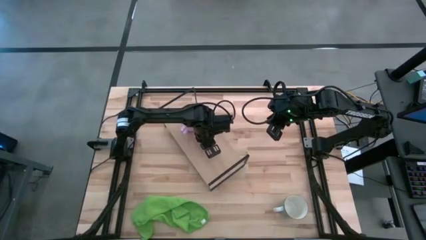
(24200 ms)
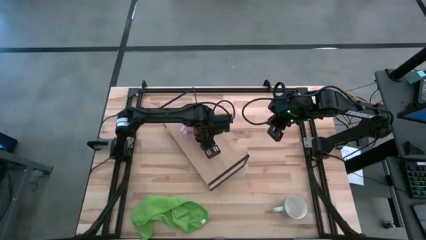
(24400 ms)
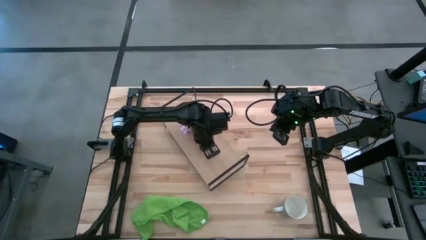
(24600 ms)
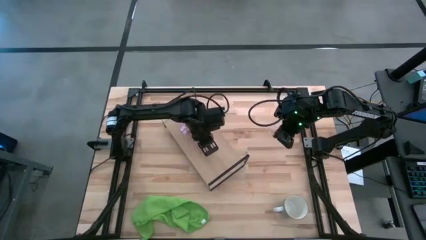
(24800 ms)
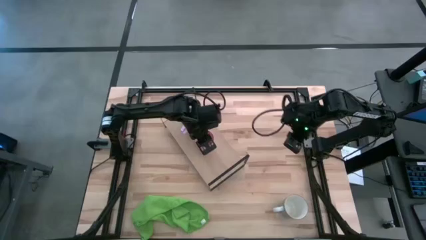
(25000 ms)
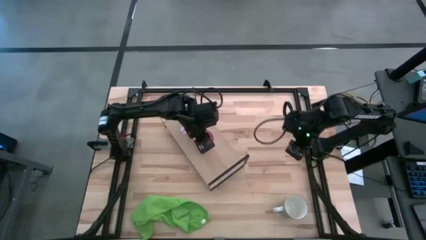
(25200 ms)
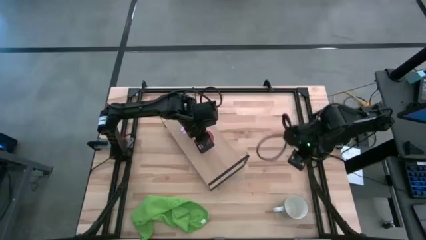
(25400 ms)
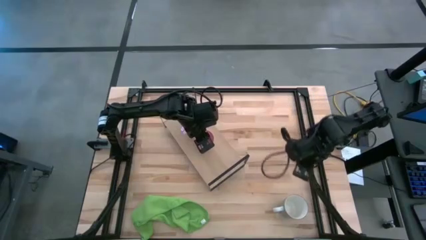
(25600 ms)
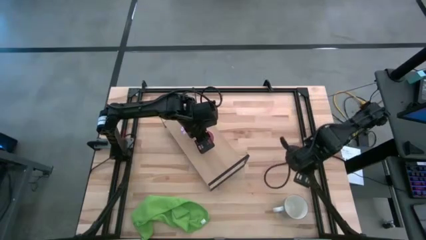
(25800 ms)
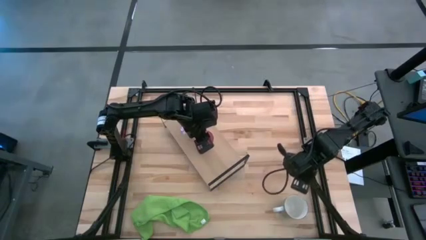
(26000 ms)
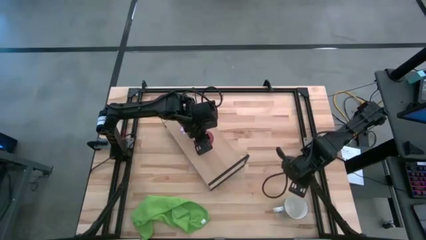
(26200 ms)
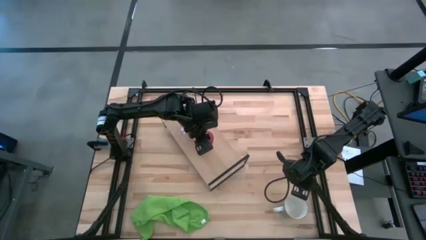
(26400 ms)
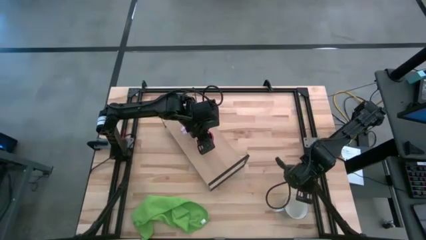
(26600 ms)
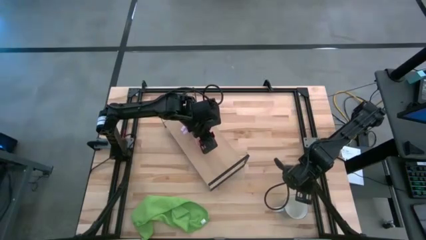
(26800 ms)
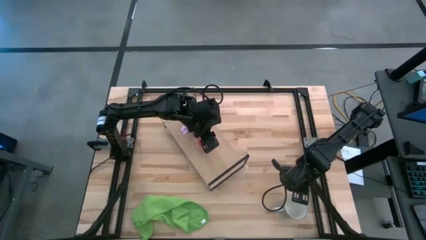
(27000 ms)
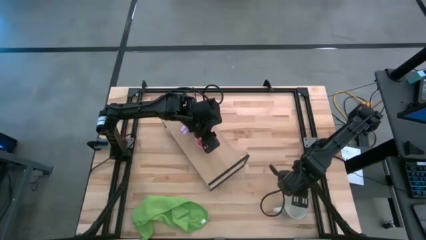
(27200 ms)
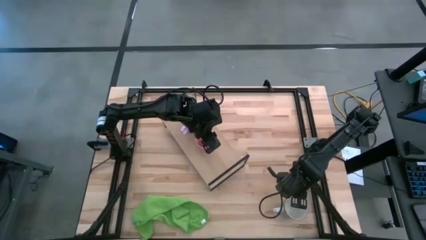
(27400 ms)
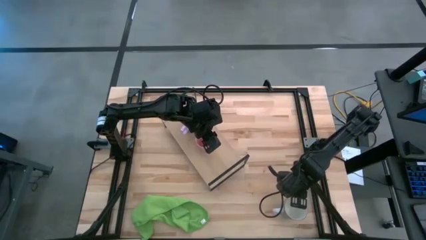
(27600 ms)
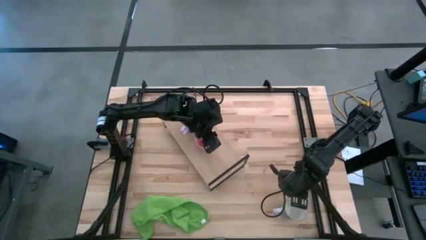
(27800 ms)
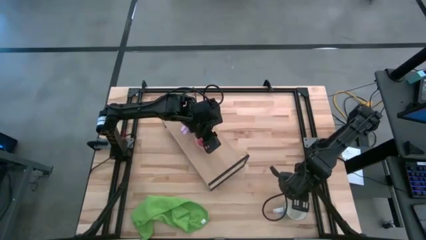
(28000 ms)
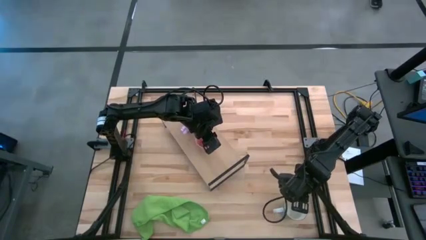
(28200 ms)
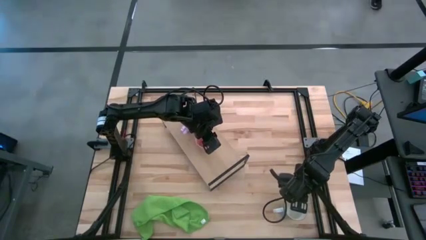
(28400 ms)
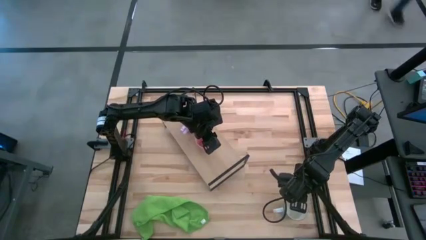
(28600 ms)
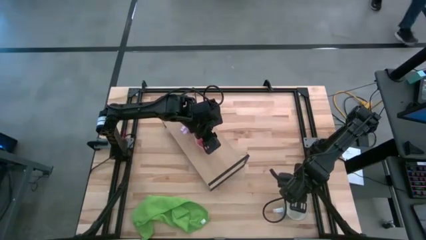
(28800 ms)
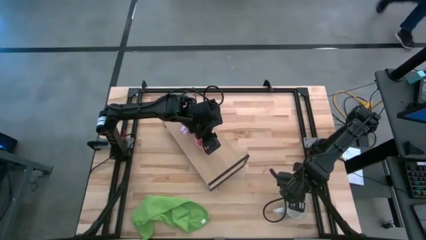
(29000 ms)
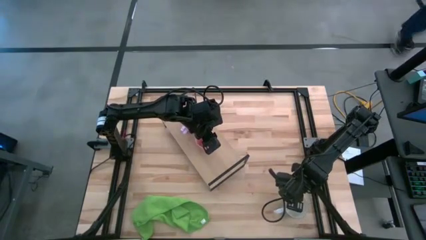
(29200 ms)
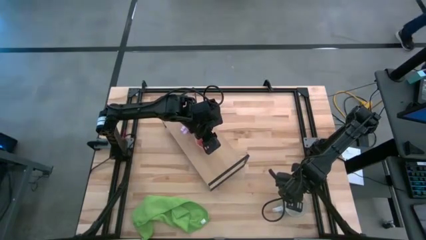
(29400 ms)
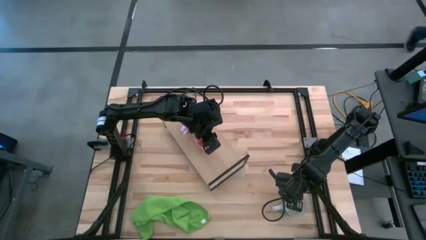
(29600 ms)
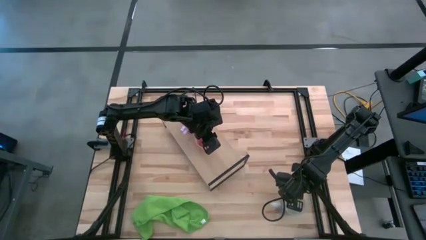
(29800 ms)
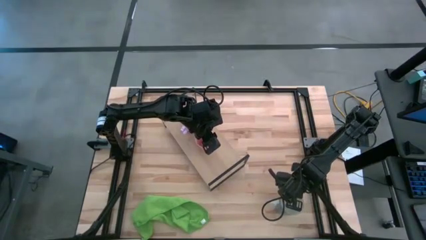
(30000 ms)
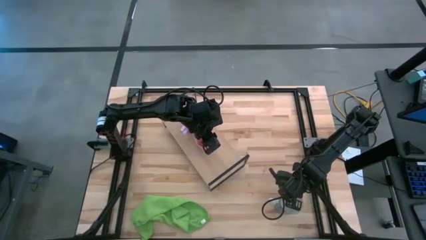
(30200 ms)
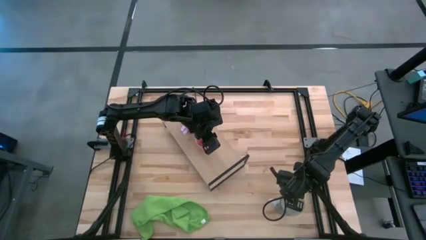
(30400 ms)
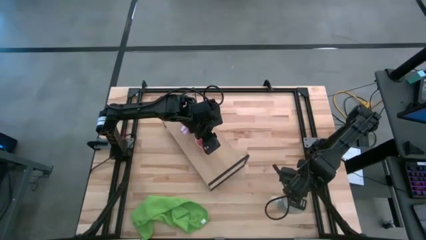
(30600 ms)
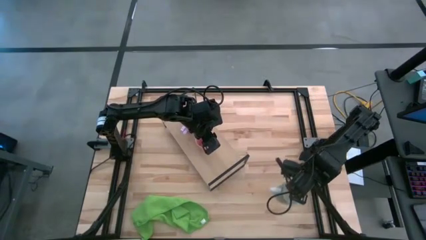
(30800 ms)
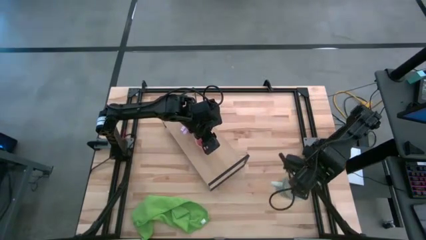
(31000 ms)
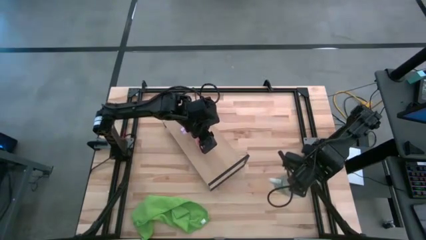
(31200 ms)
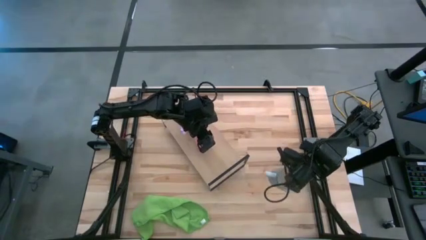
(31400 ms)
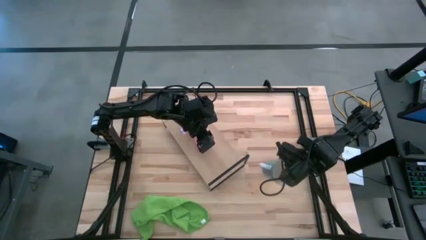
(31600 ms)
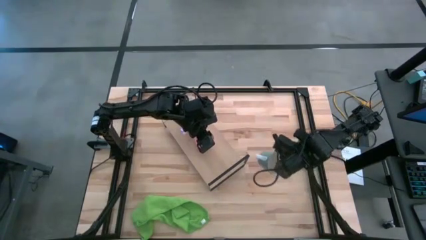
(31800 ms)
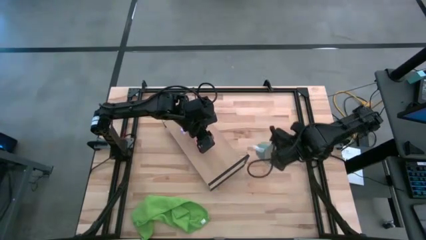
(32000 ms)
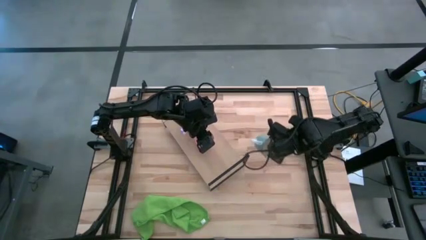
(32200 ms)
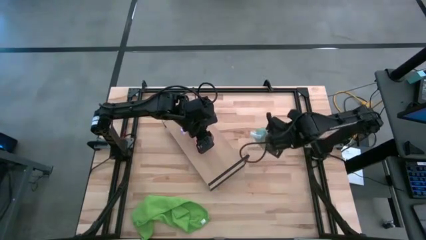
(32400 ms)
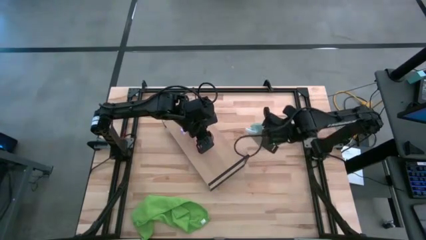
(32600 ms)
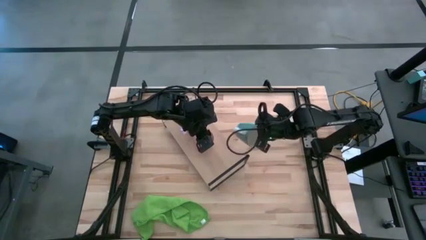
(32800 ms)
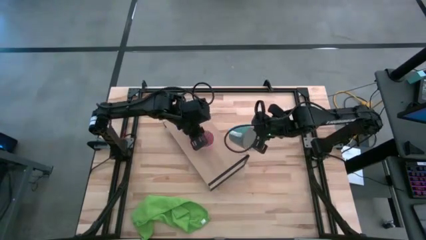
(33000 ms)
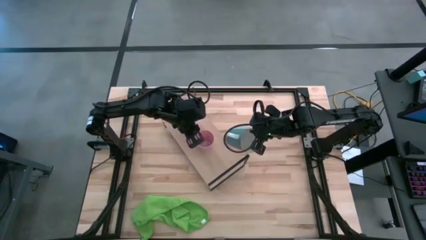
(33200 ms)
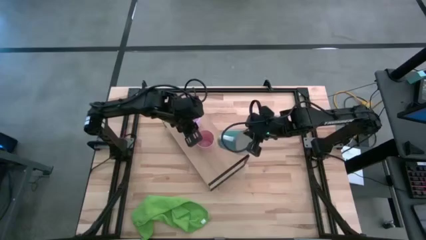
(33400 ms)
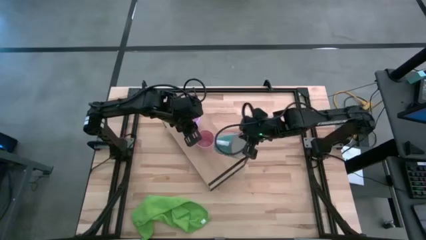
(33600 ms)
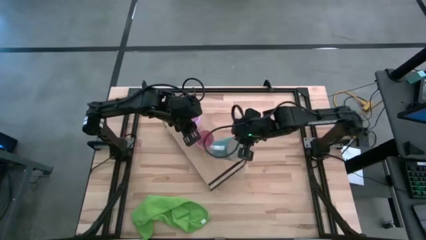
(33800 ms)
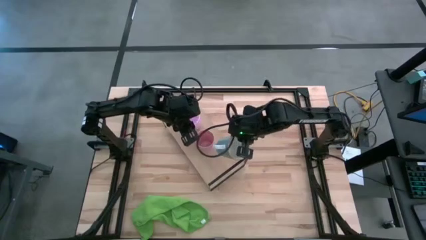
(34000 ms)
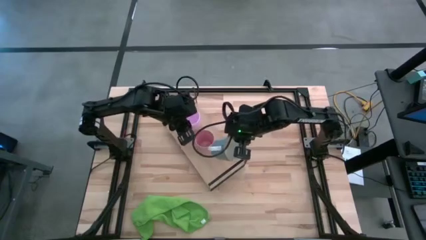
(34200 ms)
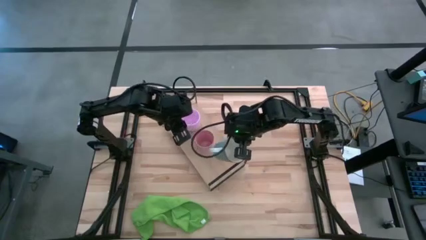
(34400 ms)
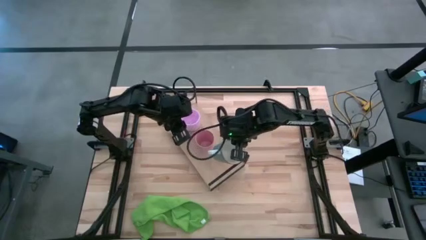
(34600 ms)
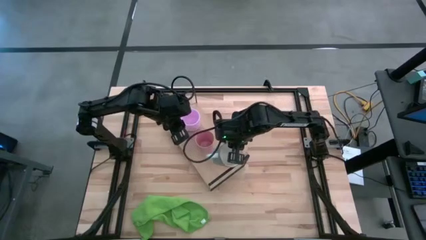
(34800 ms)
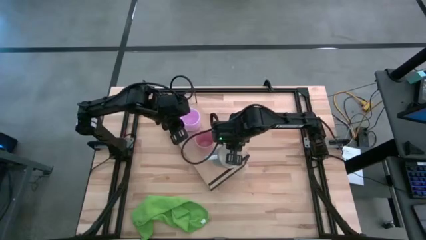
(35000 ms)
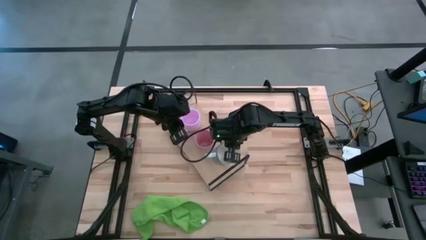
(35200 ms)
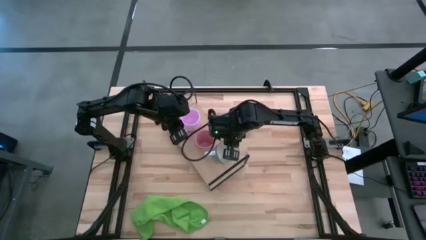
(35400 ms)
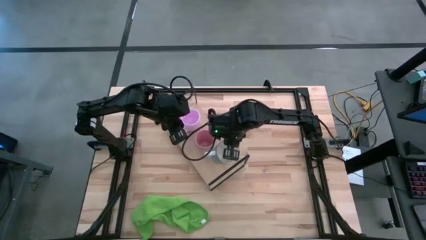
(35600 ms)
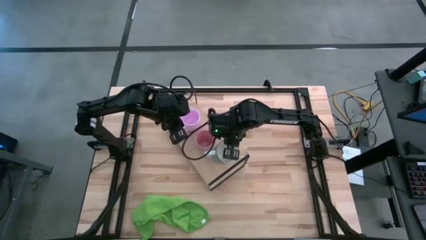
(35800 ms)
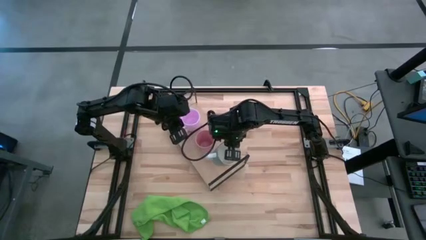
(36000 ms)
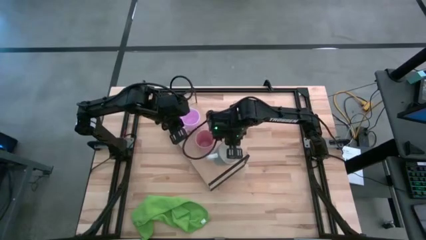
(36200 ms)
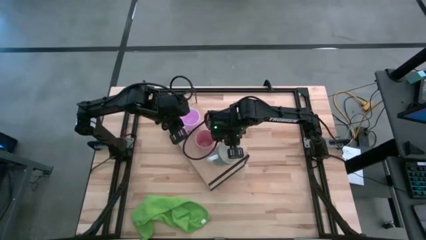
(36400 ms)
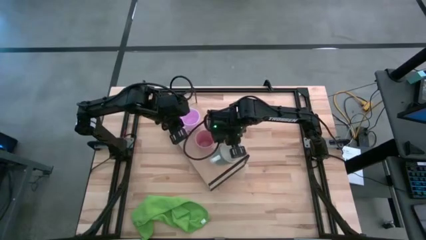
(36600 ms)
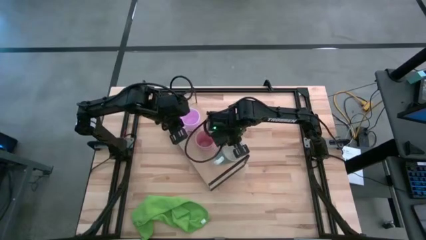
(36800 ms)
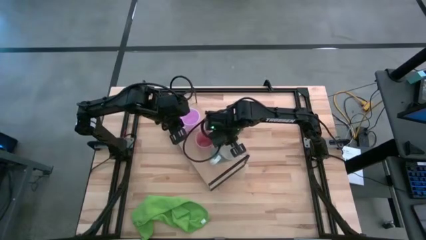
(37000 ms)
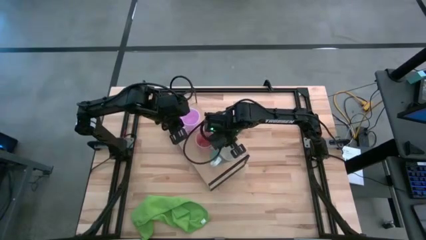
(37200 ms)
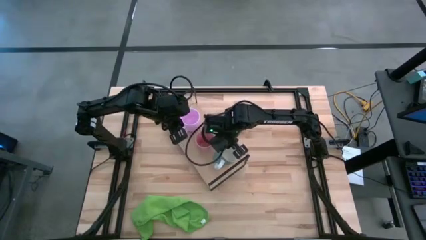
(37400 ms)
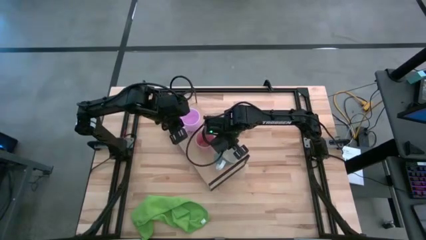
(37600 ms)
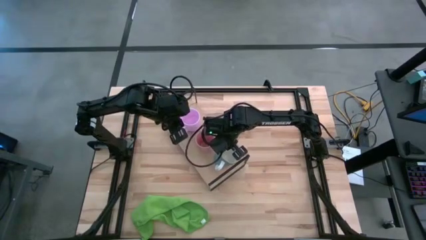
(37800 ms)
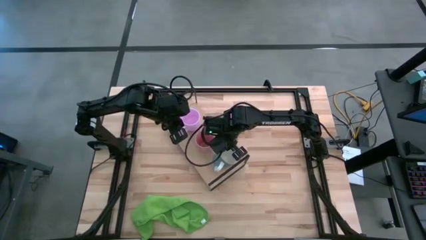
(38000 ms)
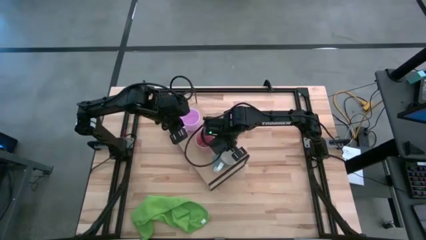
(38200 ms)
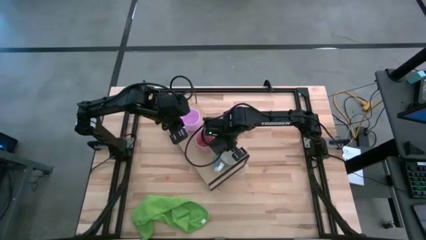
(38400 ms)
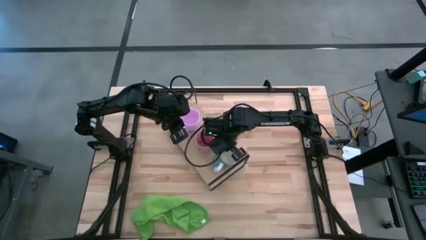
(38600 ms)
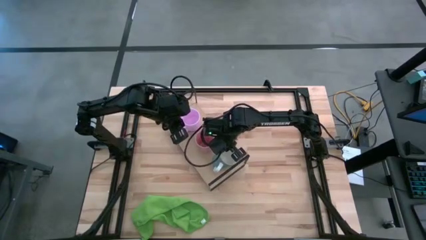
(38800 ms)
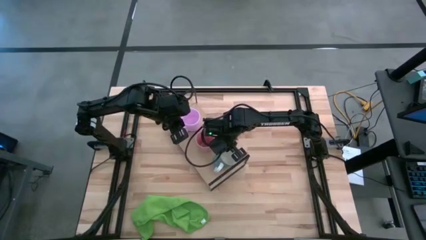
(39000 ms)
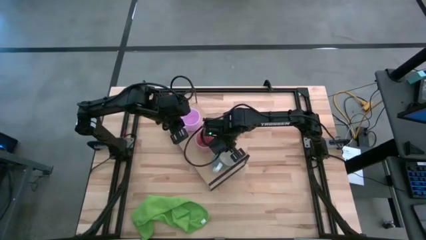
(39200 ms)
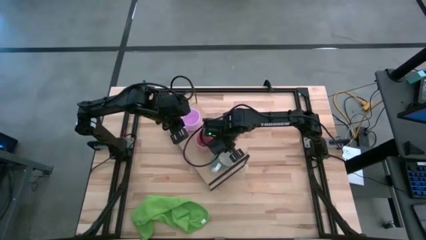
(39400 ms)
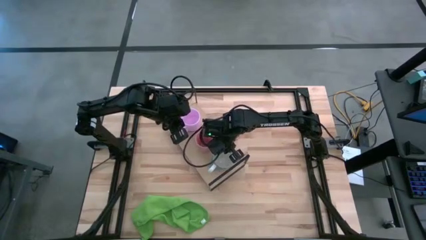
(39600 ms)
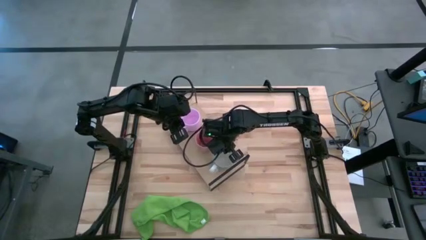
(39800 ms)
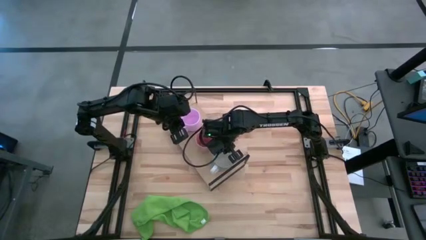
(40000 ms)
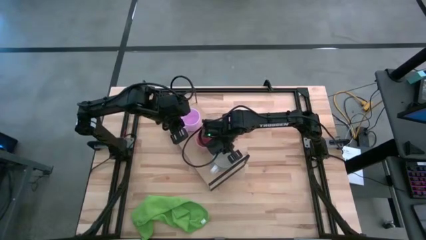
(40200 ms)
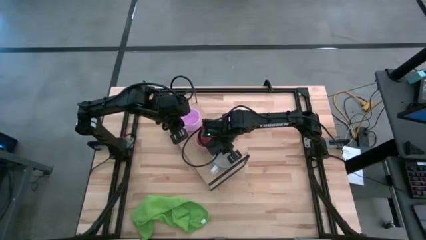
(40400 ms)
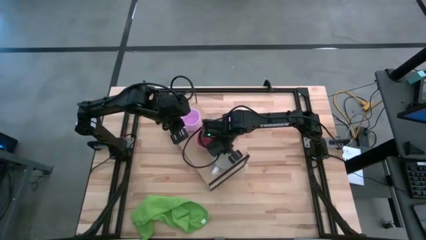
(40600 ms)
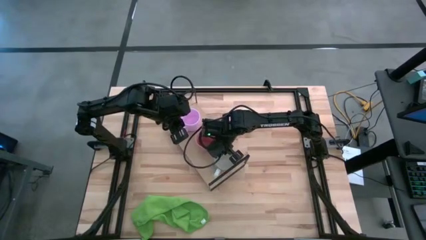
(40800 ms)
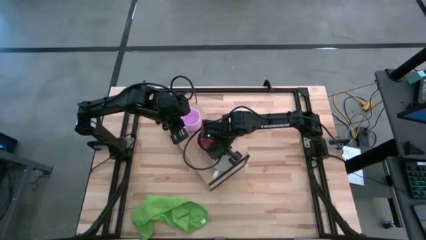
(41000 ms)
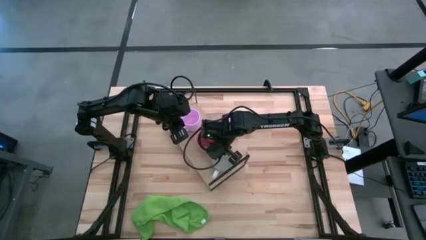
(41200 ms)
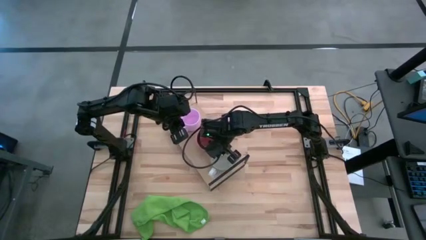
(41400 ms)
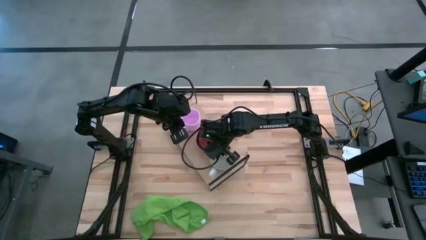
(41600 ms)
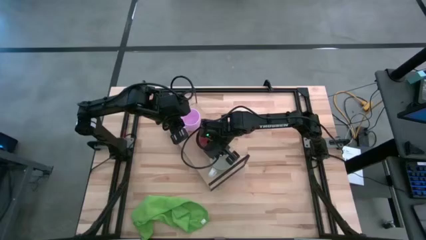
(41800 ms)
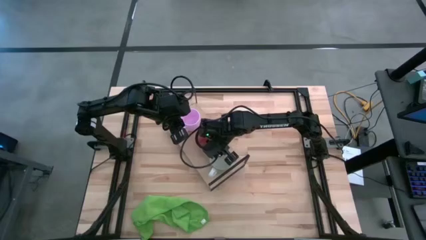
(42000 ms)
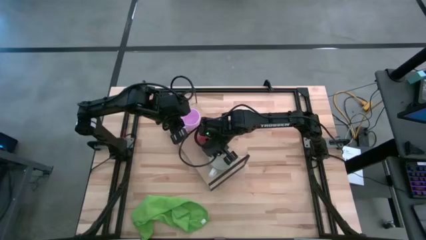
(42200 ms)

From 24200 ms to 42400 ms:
Task: Stack small to large cups/mugs on shelf
Put the blue mug on the shelf
